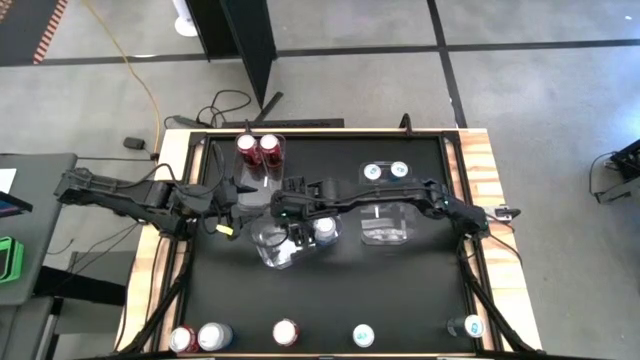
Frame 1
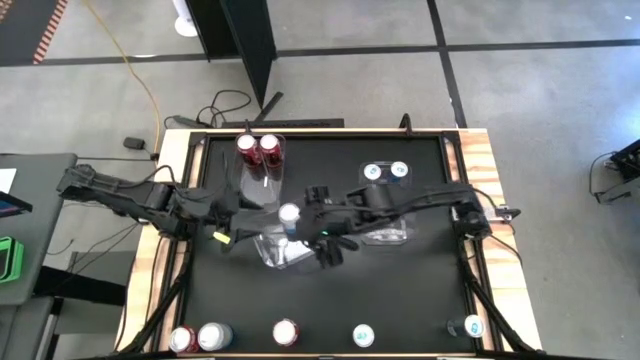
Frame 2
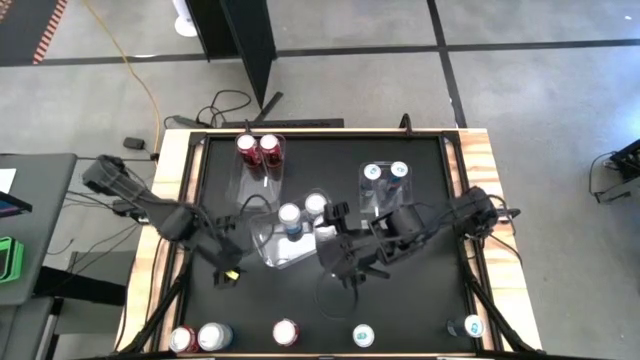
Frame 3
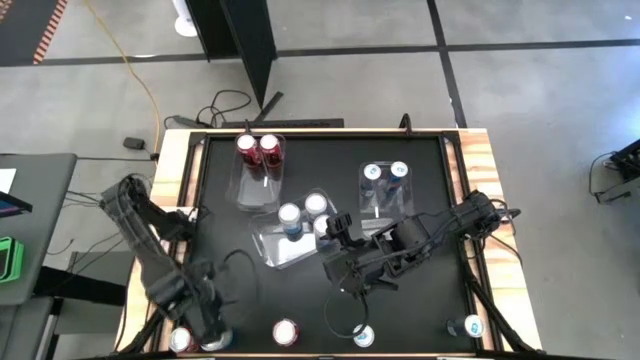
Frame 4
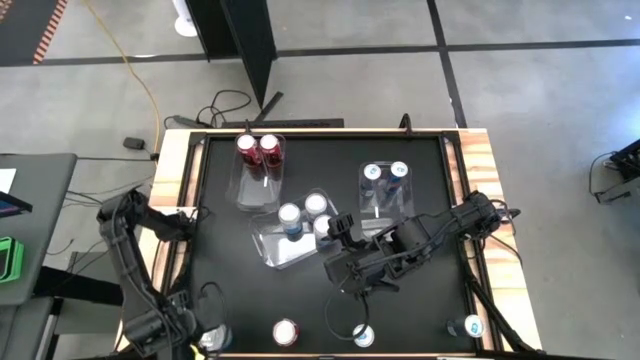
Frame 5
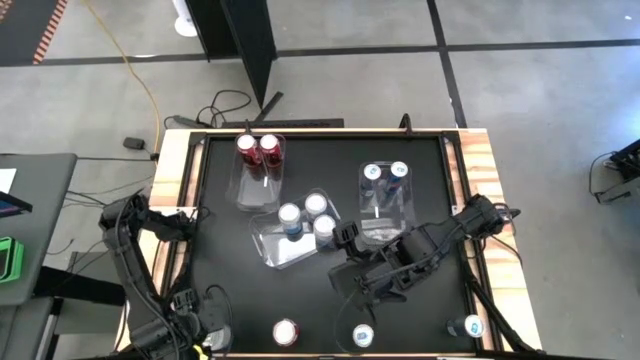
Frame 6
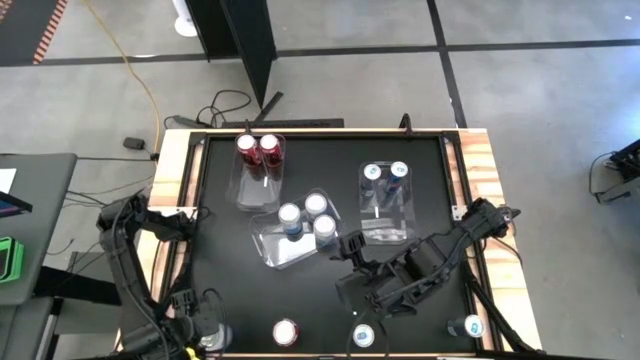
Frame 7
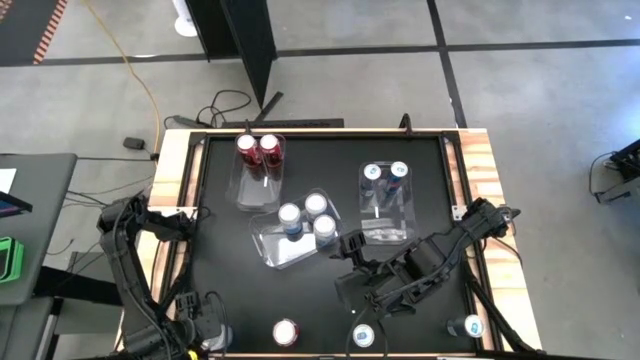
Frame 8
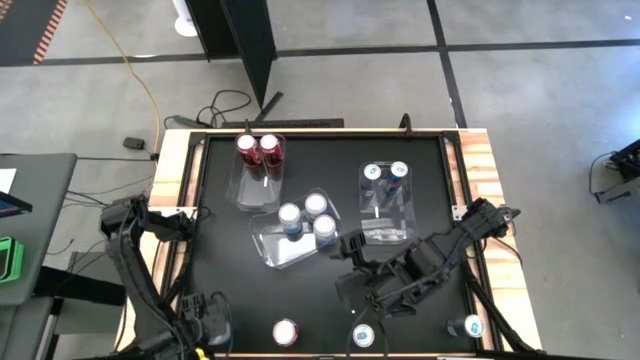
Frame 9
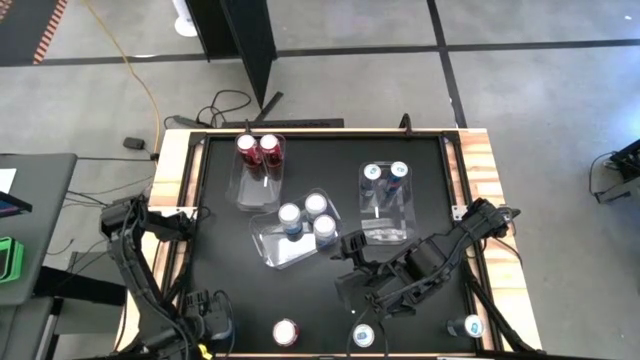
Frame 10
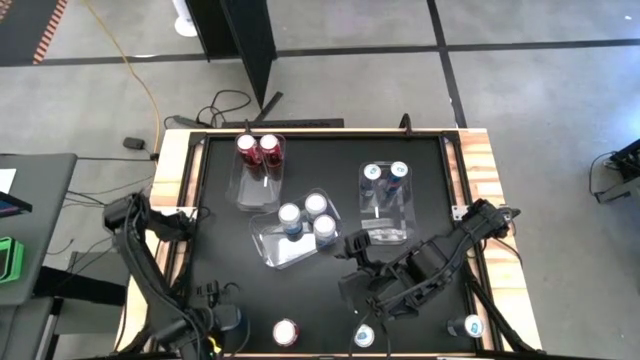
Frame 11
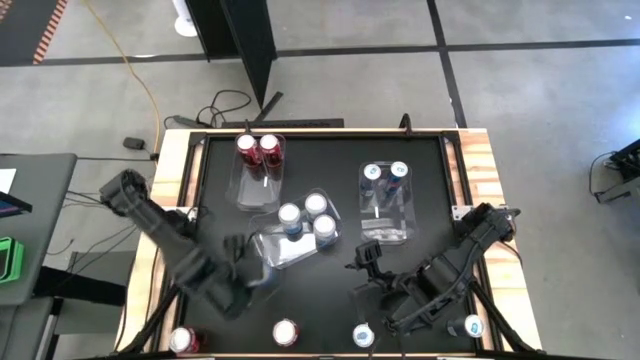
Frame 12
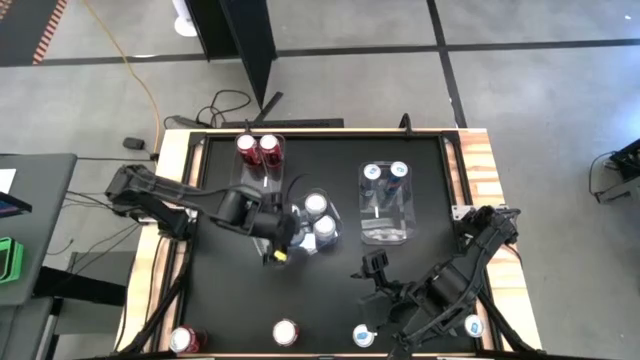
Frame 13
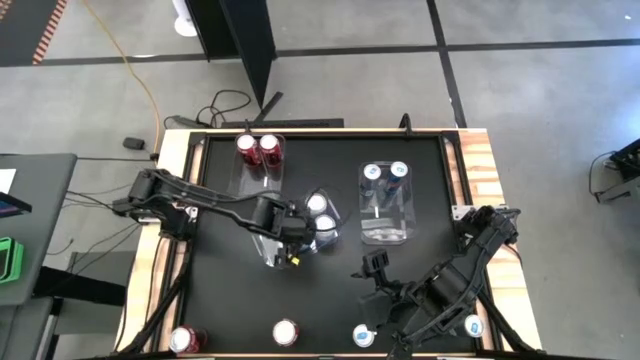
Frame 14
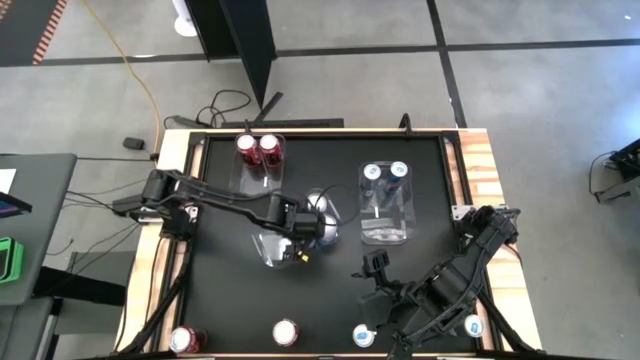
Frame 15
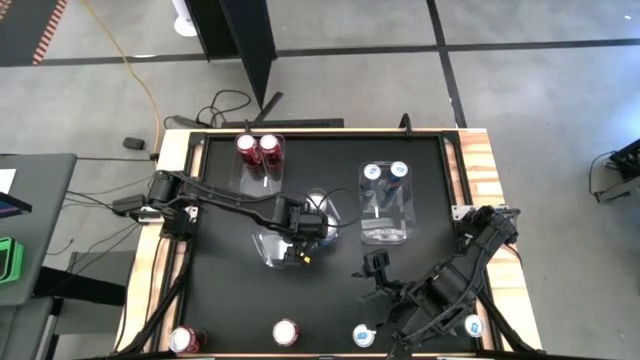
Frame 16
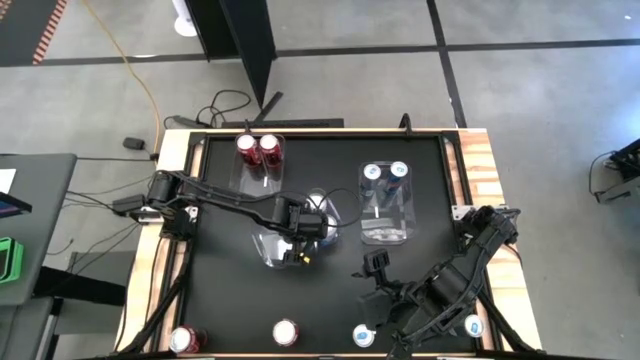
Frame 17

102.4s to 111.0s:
Task: Sort soda cans
Put the white blue soda can into the middle transparent bin

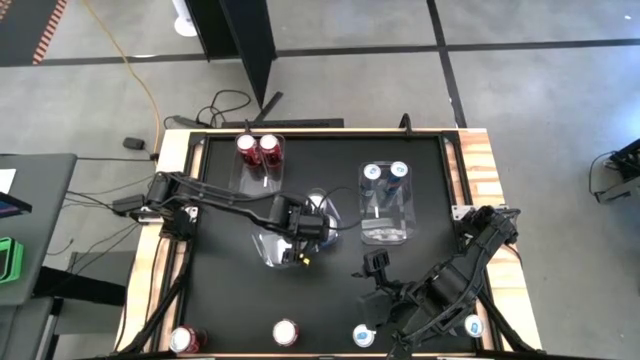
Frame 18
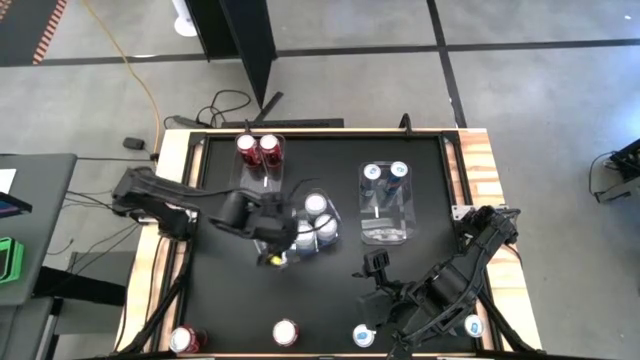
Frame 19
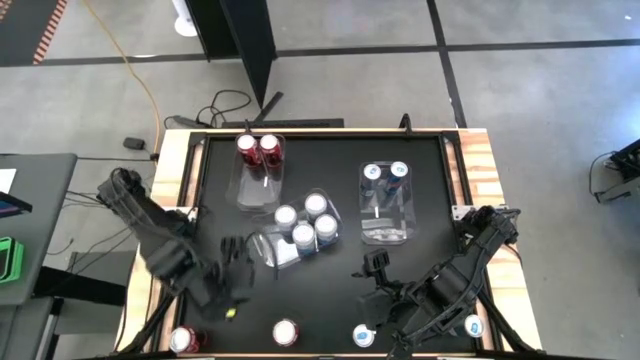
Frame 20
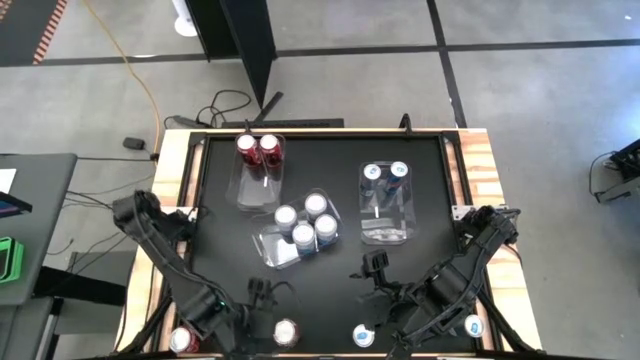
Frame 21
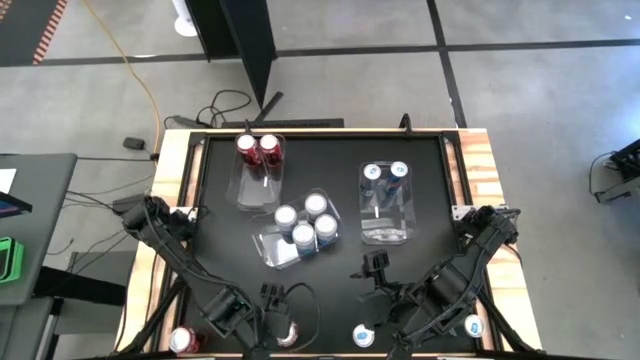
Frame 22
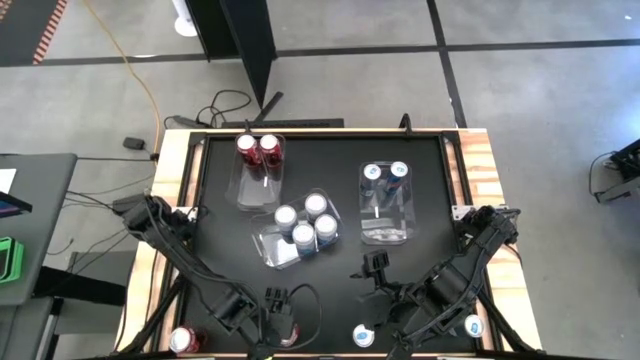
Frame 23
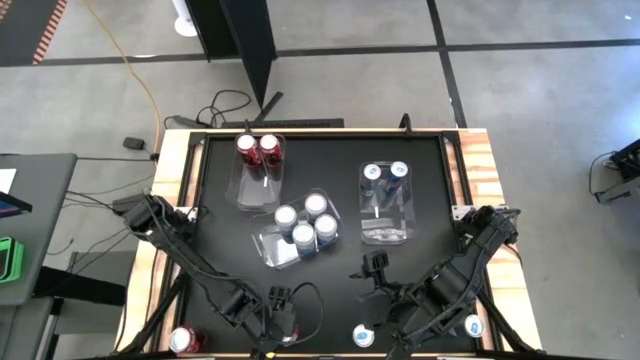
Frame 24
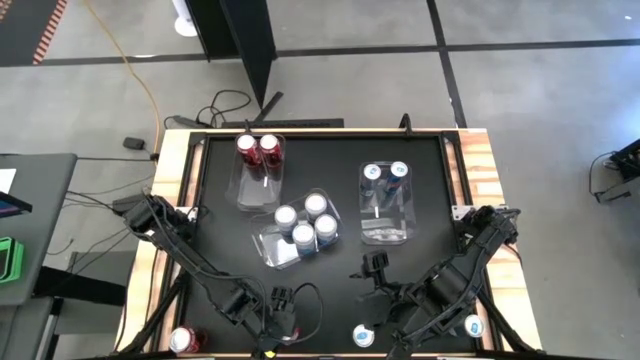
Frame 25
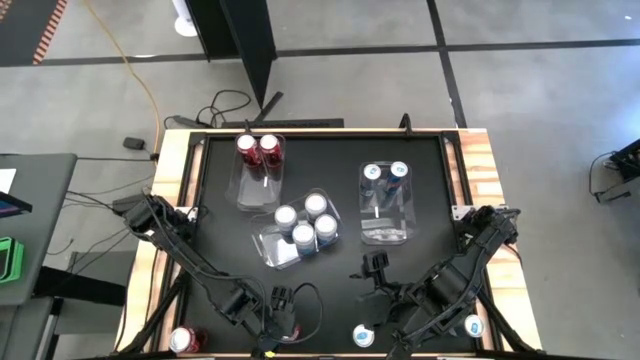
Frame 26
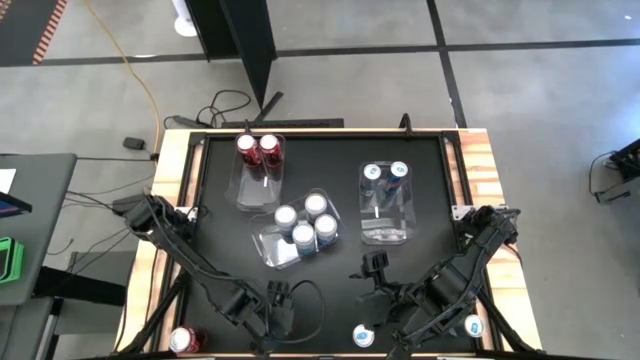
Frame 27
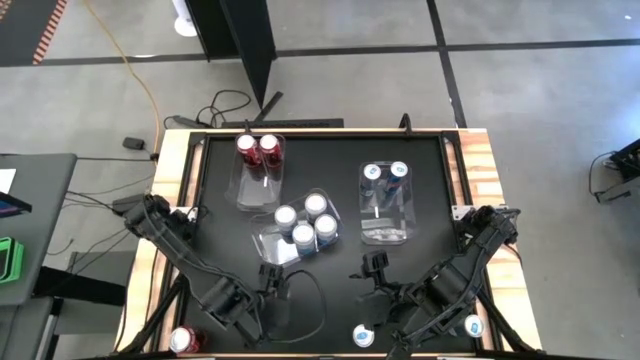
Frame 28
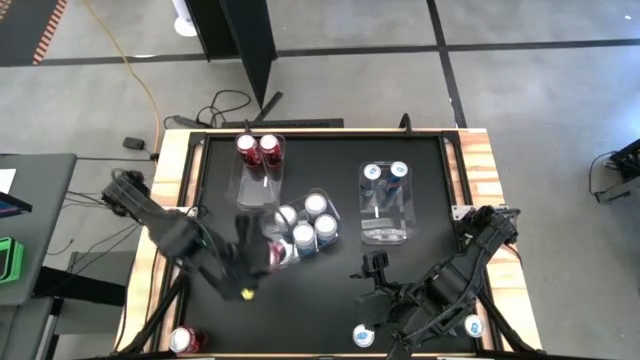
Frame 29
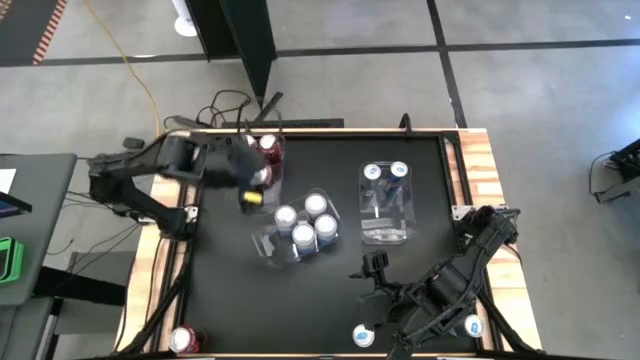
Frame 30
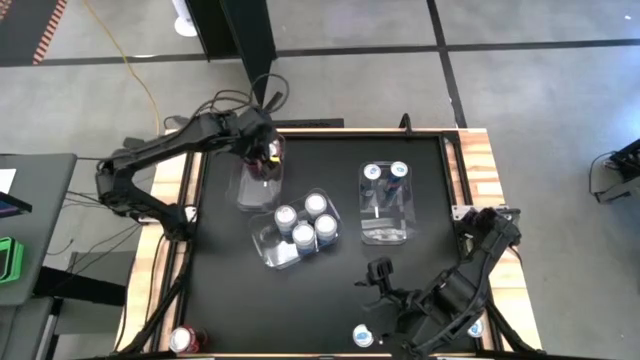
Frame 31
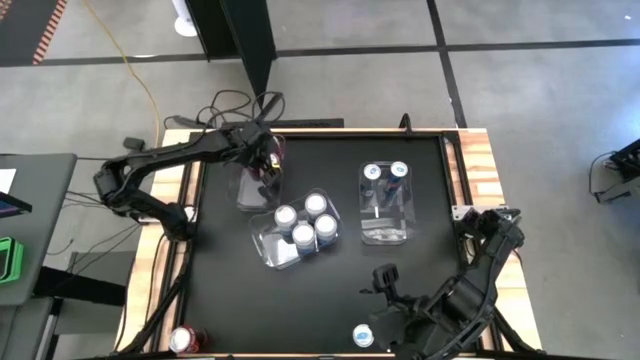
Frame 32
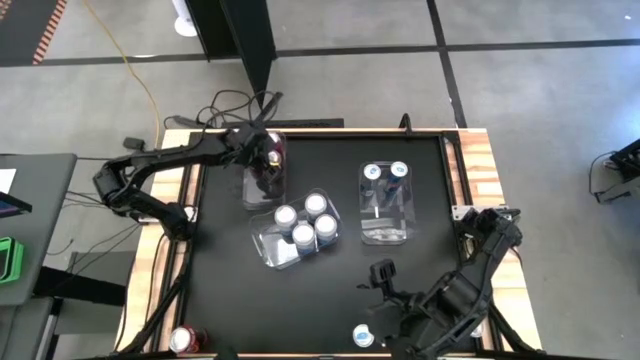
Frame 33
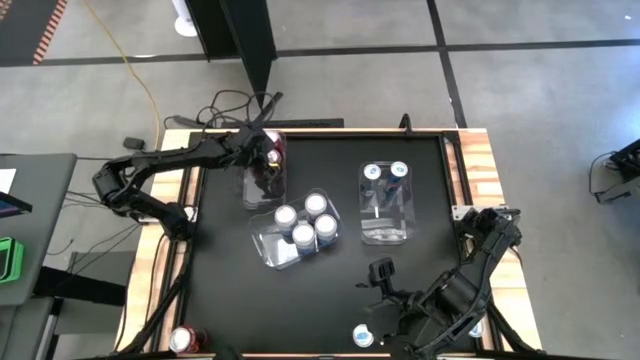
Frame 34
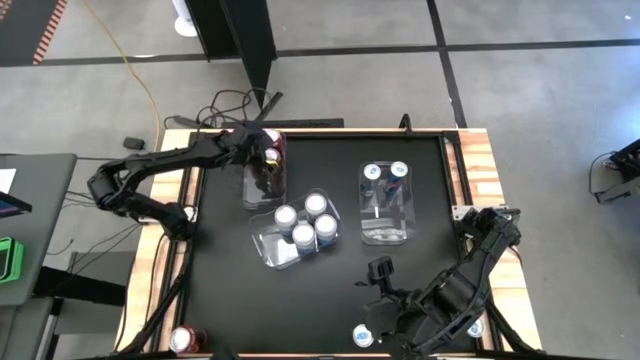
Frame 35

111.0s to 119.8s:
Put the right red soda can into the left transparent bin

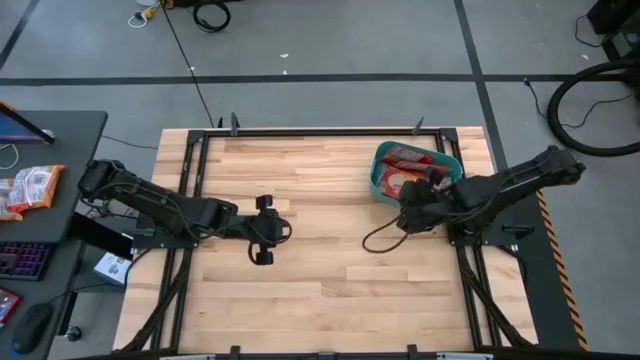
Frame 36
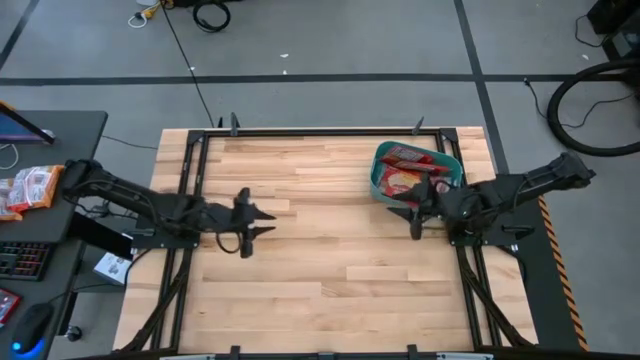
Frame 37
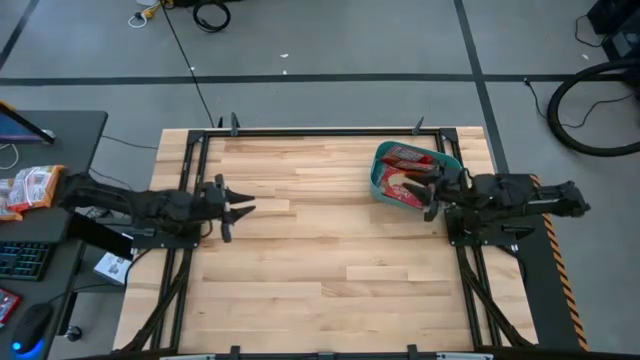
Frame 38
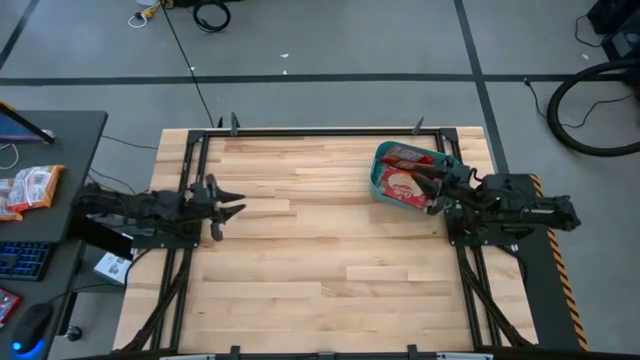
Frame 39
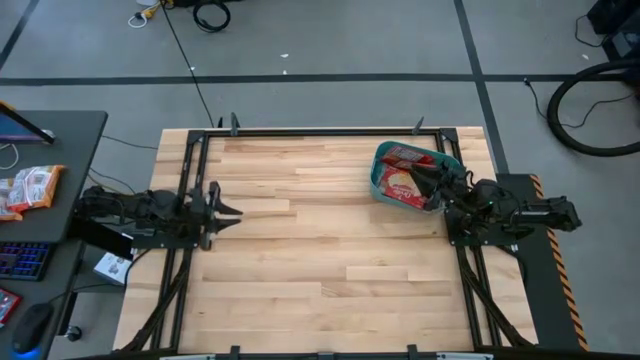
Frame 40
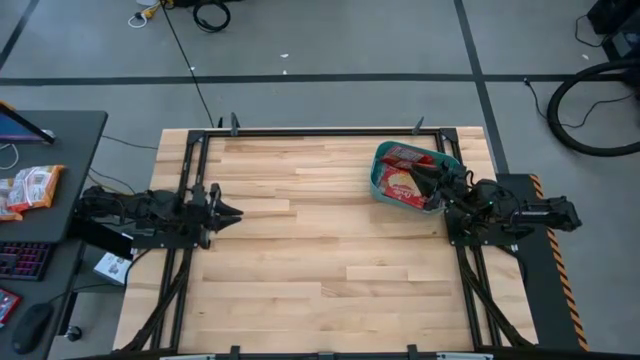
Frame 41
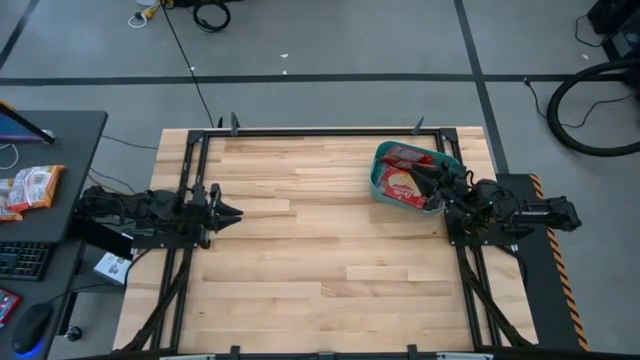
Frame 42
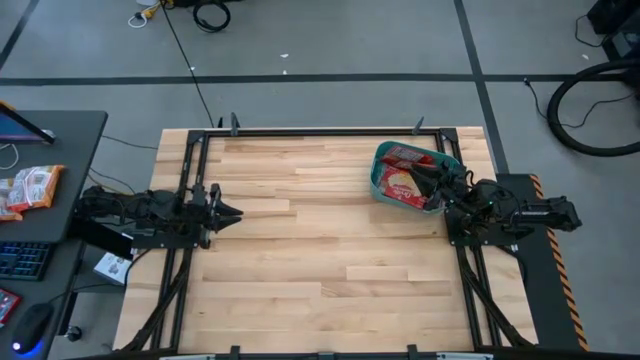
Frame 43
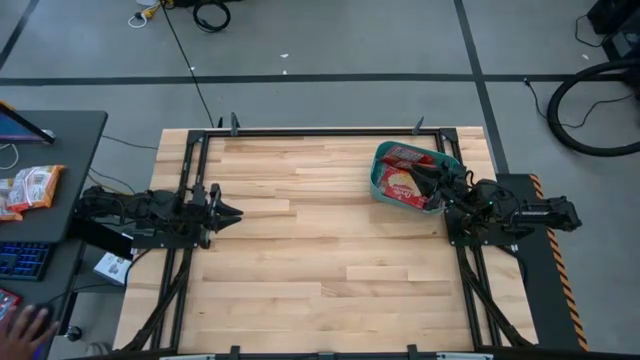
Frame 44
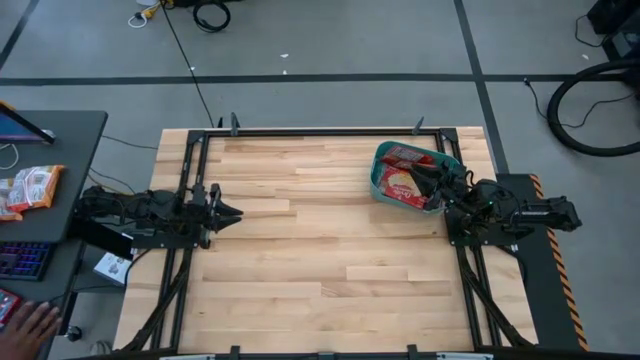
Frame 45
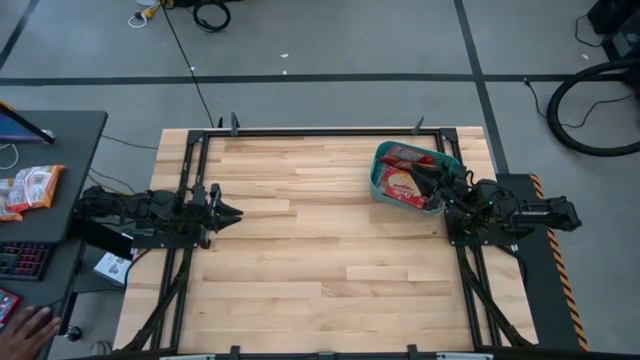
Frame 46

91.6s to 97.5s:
Task: Sort popcorn bags into baskets
Return to Home Position
